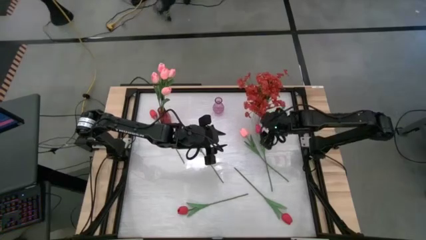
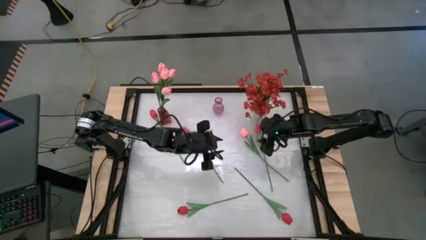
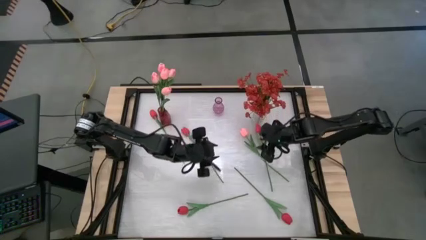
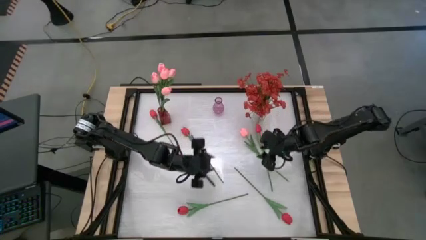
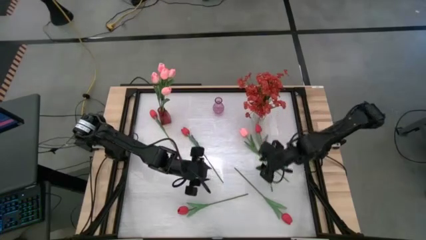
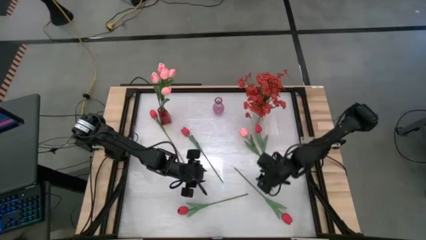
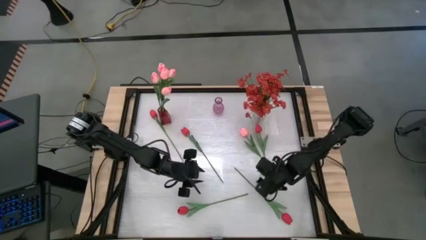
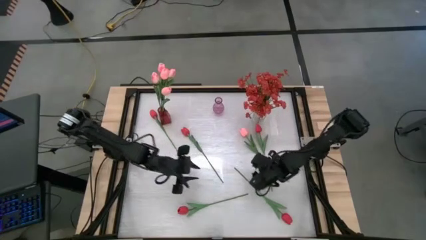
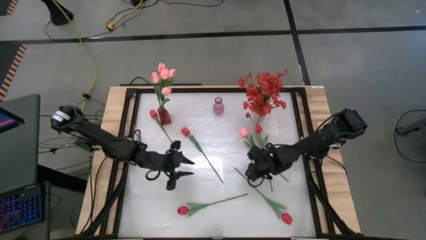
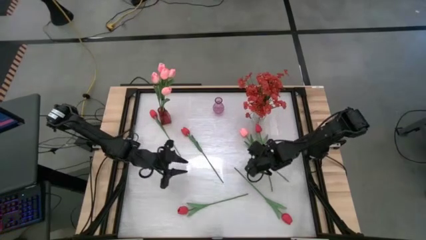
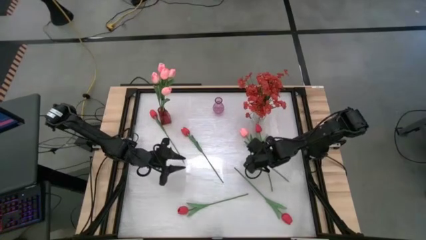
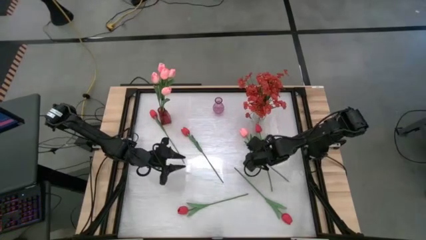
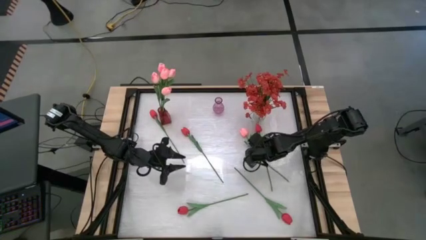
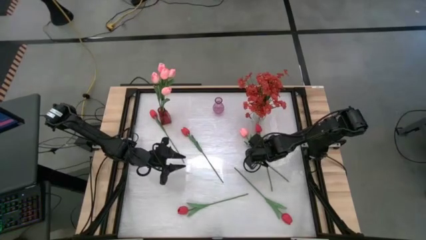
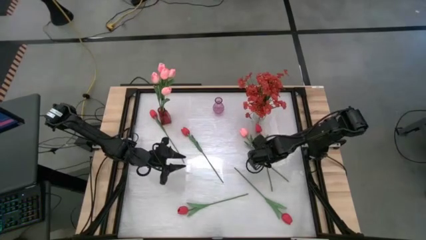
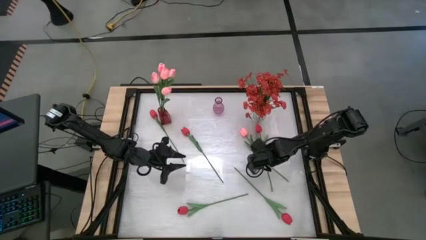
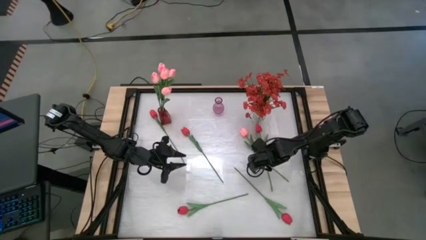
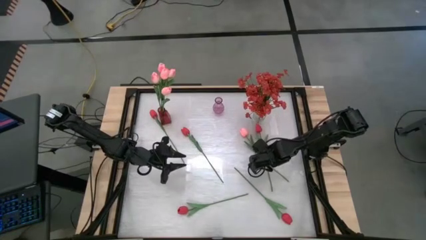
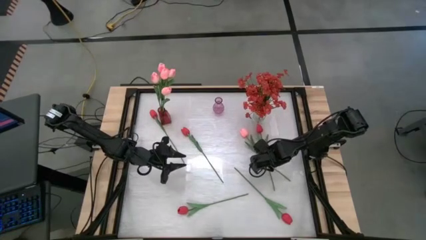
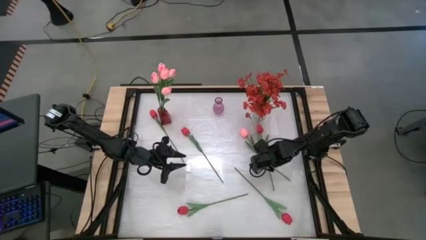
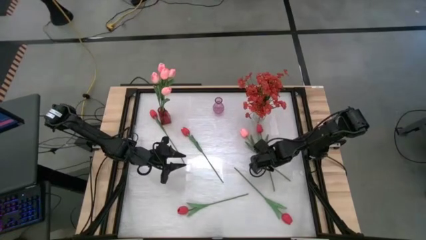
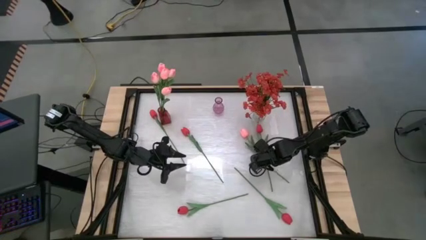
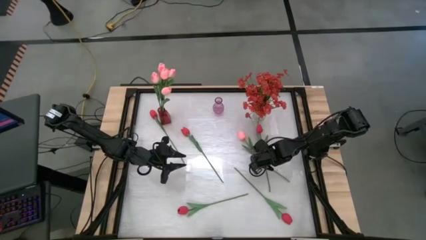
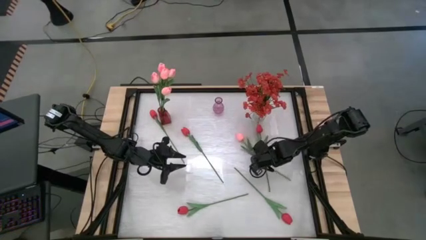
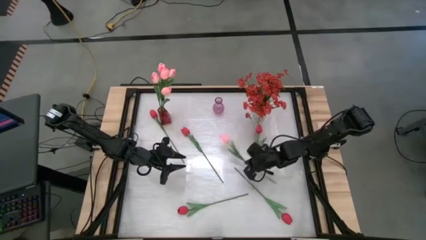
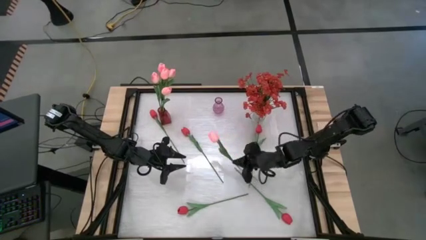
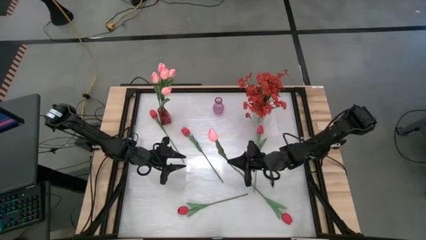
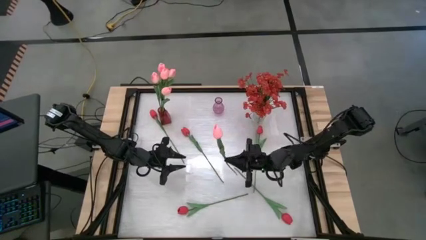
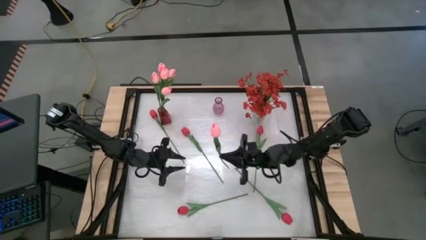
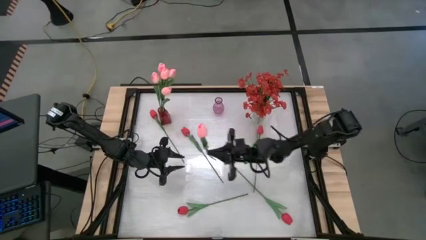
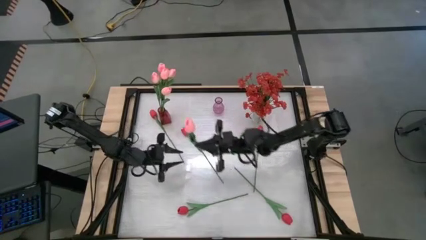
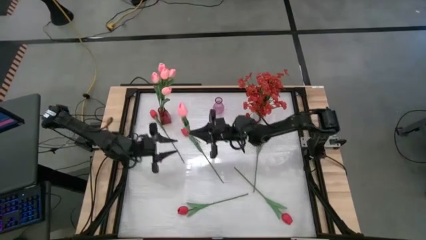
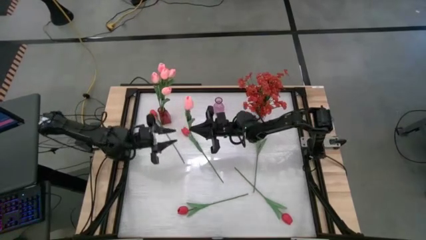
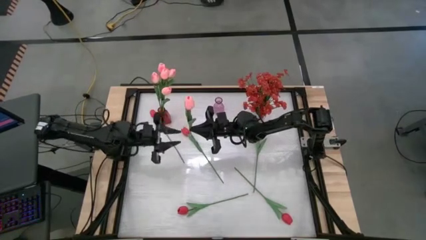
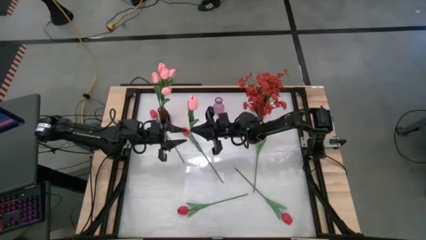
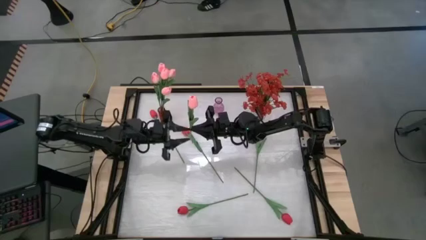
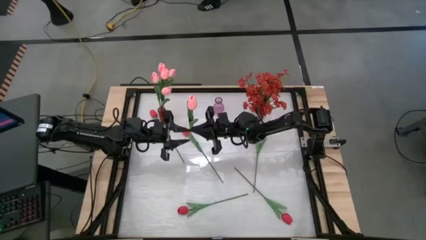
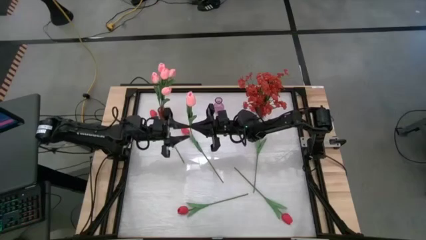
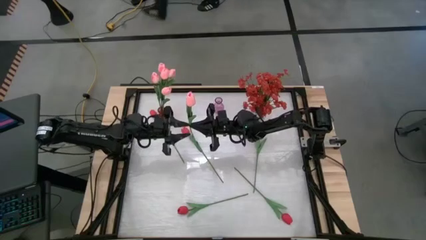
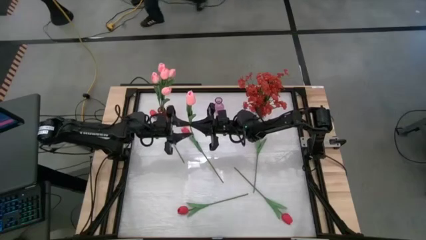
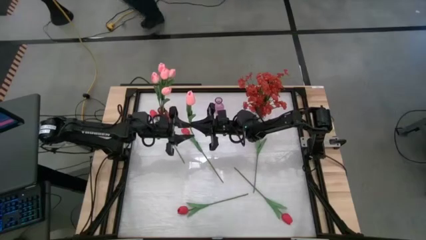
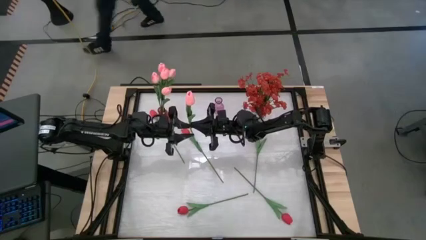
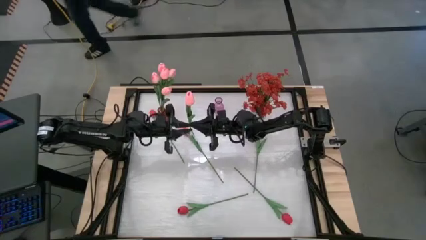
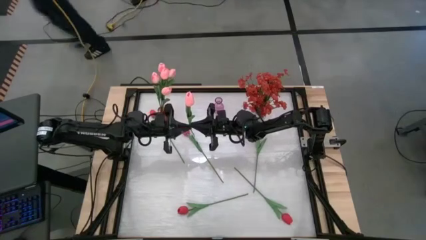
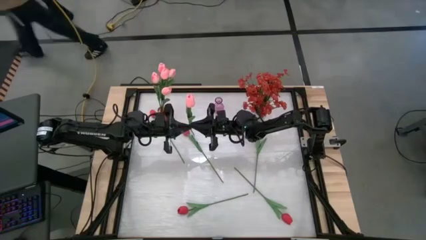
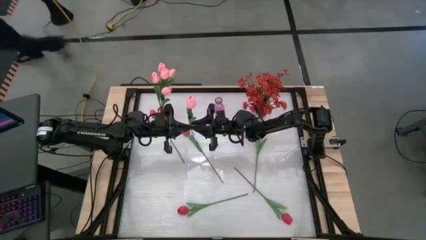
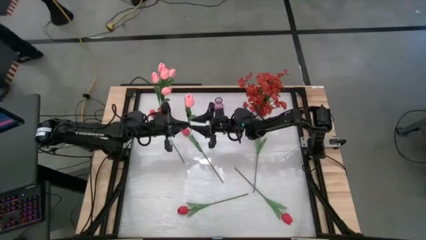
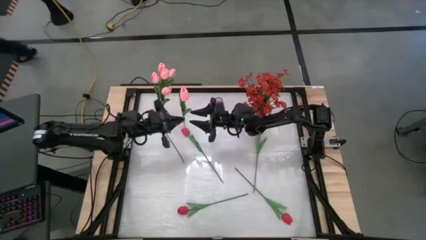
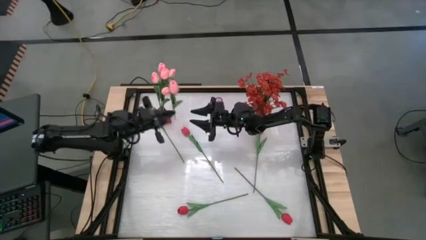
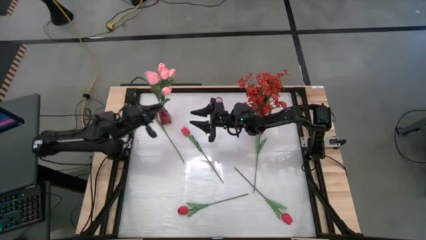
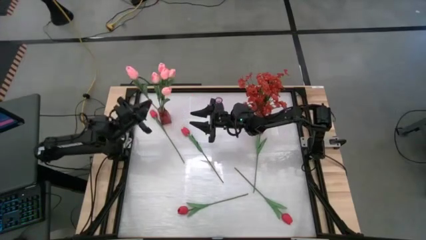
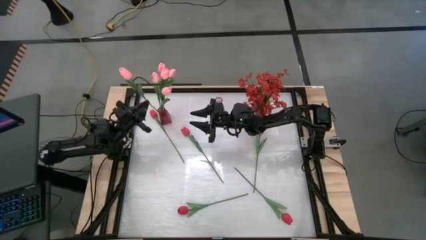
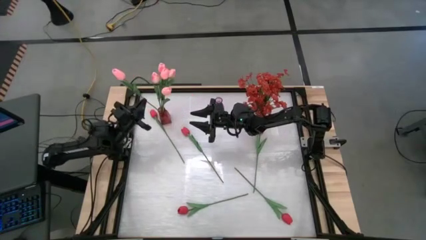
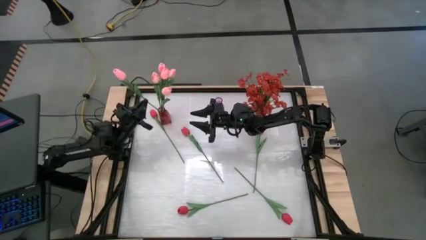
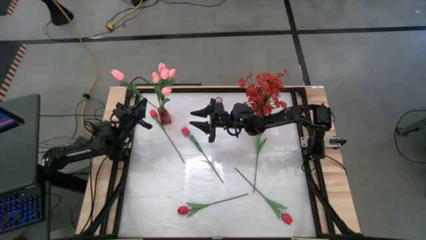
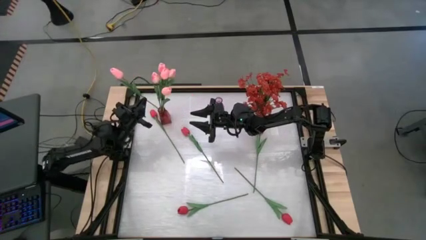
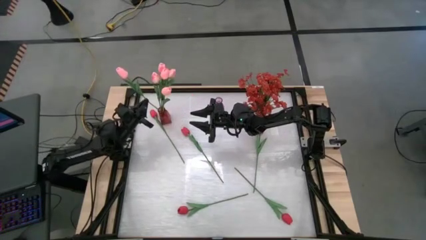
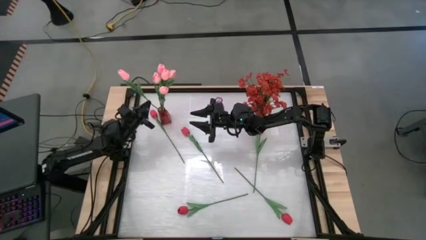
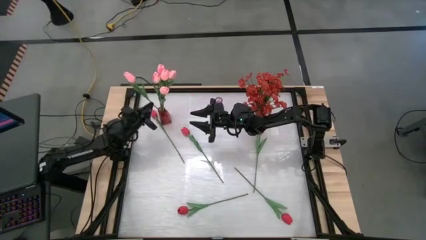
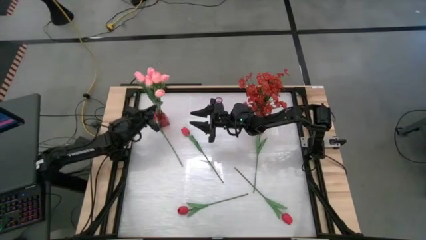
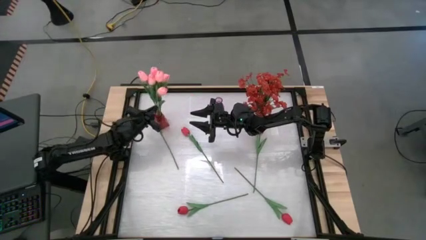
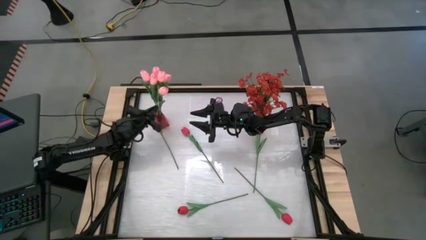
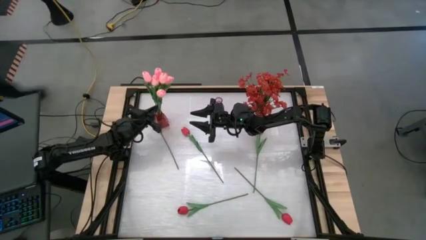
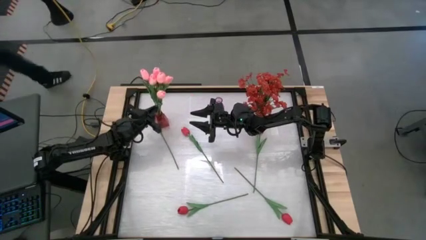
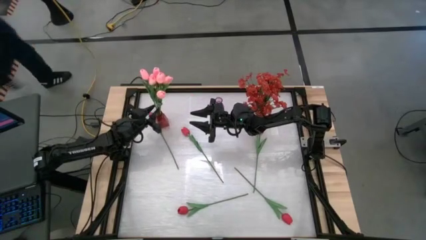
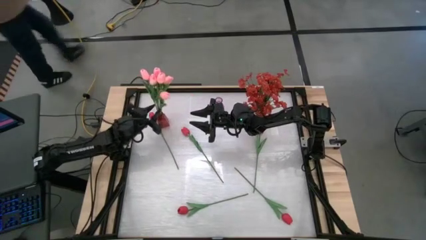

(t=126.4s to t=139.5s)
Task: Sort flowers into vase by color
Put the pink tulip into the red vase

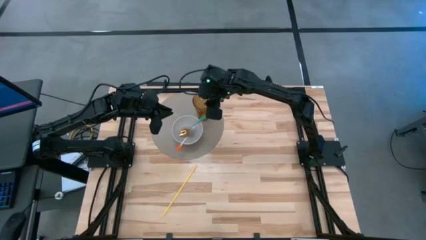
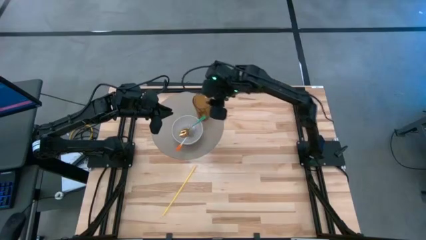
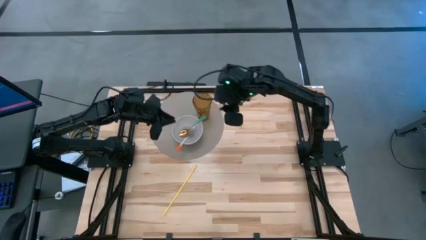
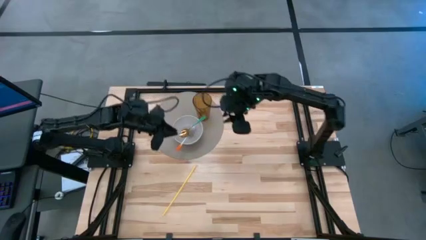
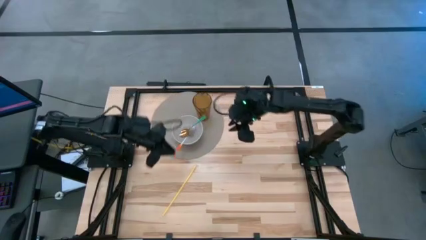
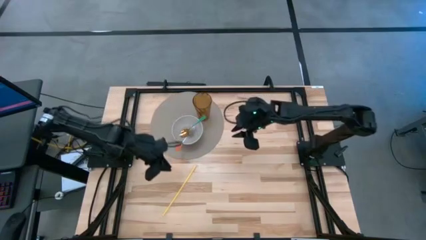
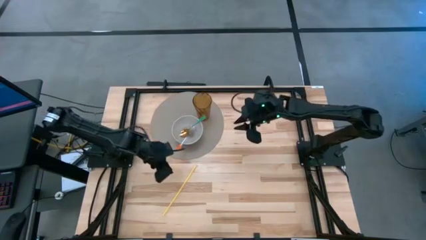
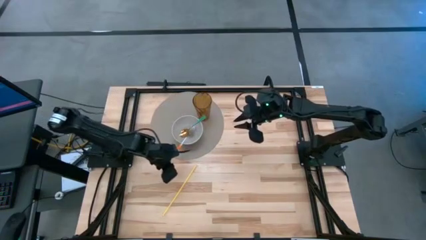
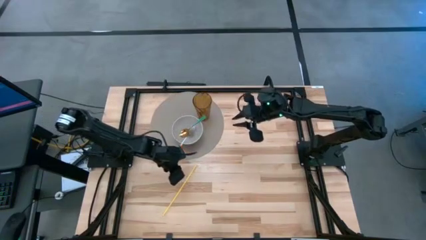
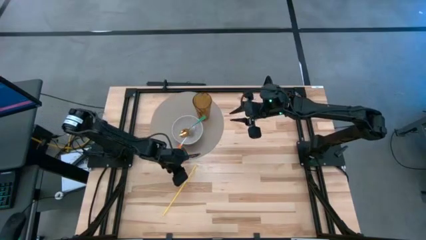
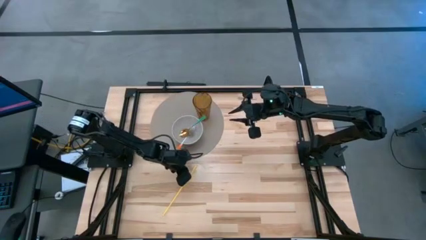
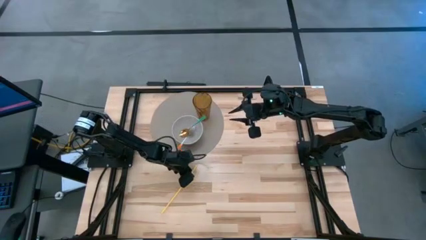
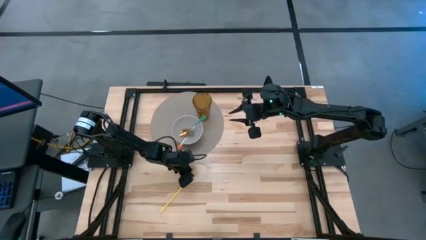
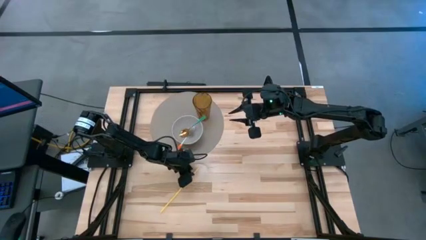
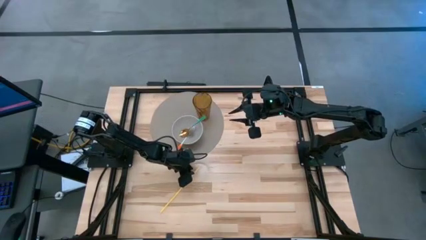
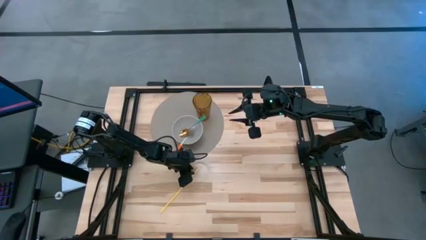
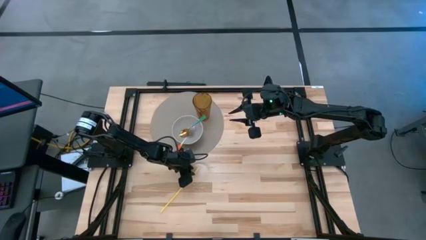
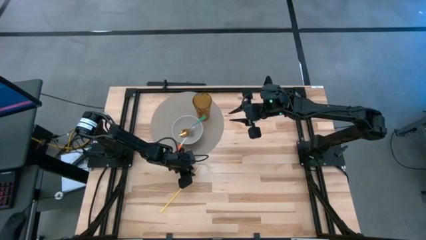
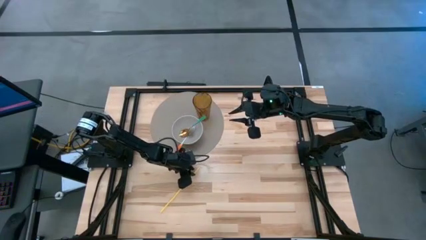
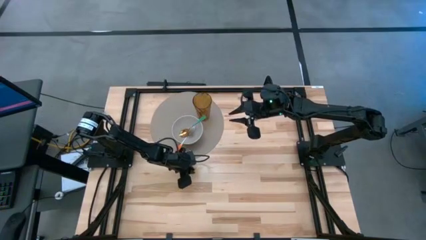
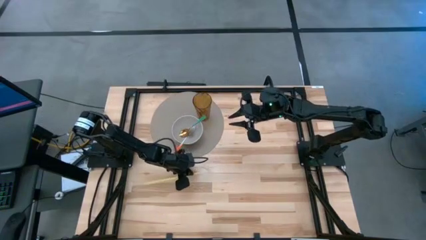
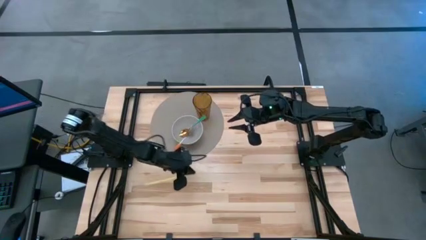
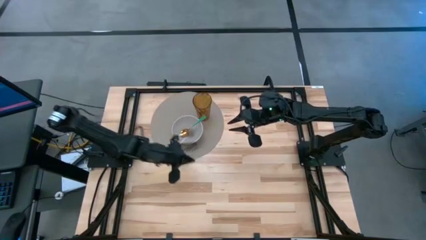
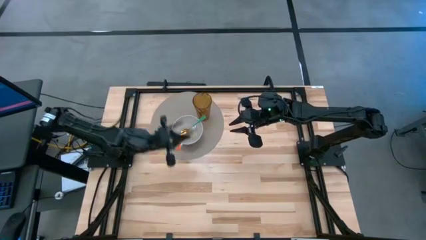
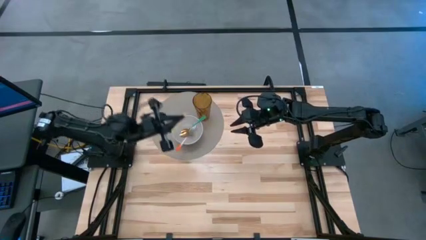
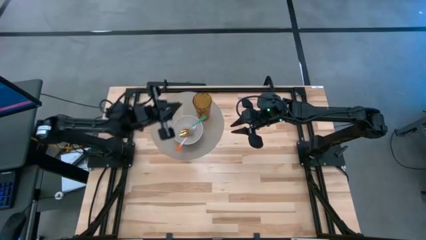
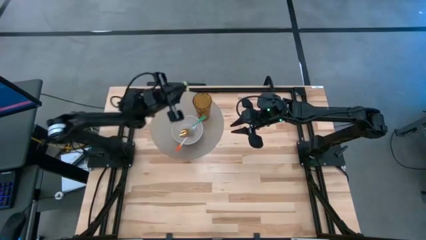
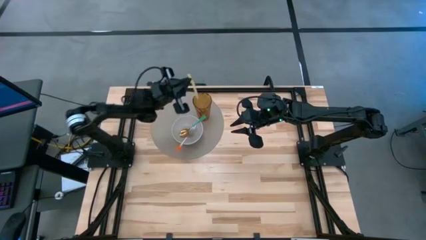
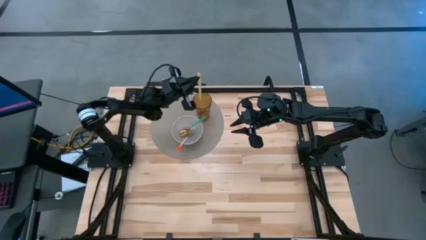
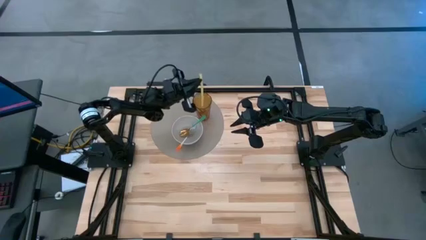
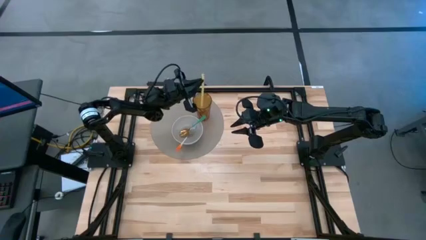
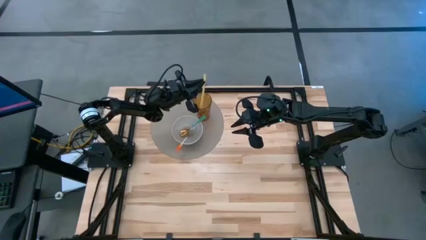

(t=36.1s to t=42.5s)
Task: Pick & Place Utensil
Put the straw into the cup on the table placemat
